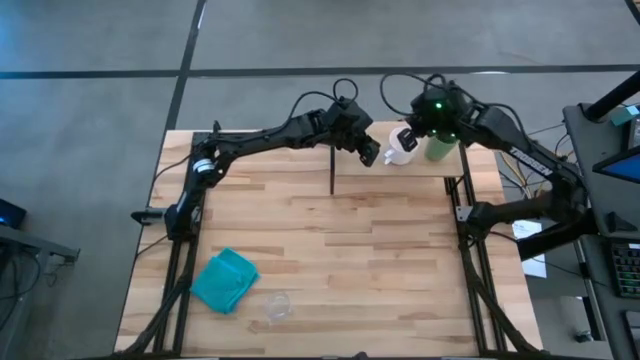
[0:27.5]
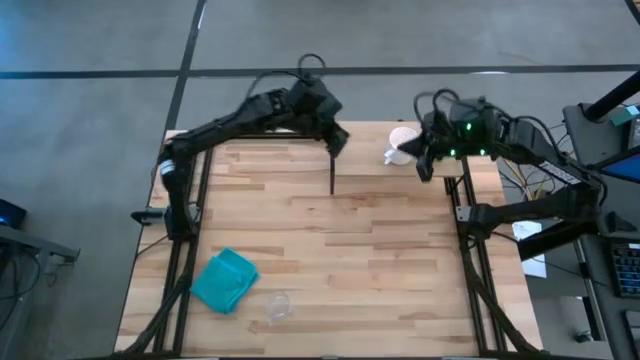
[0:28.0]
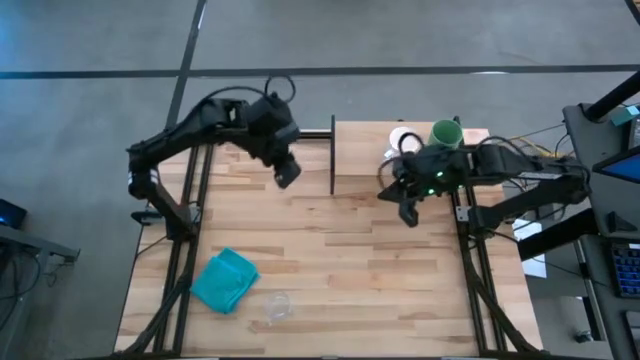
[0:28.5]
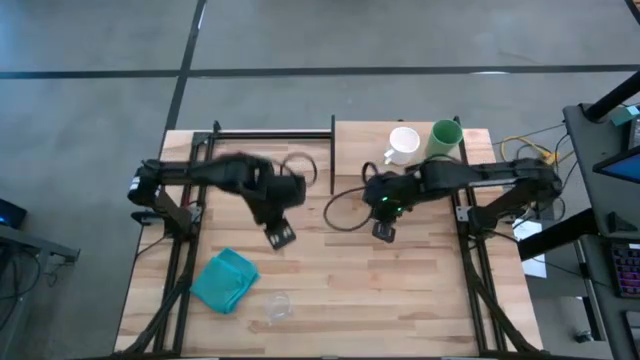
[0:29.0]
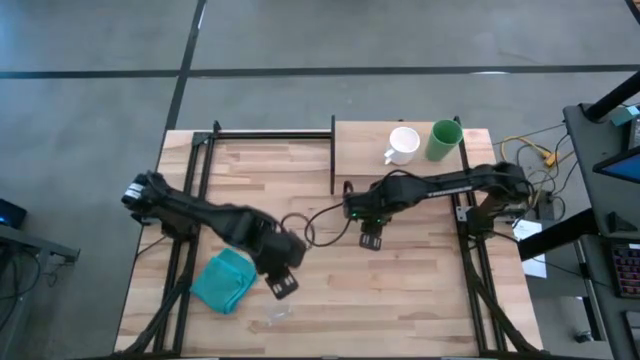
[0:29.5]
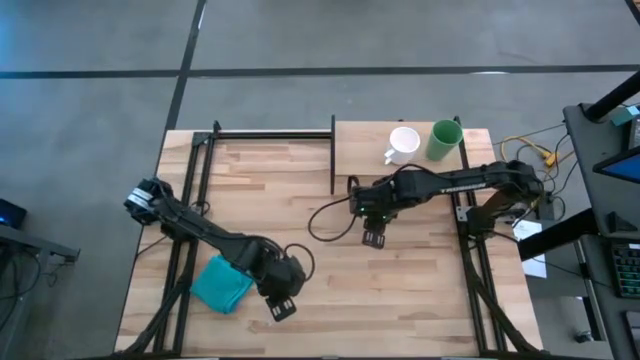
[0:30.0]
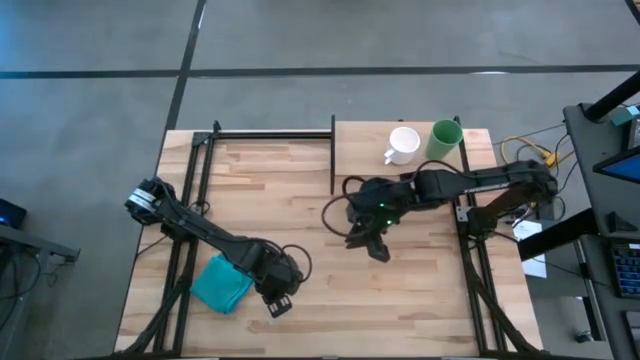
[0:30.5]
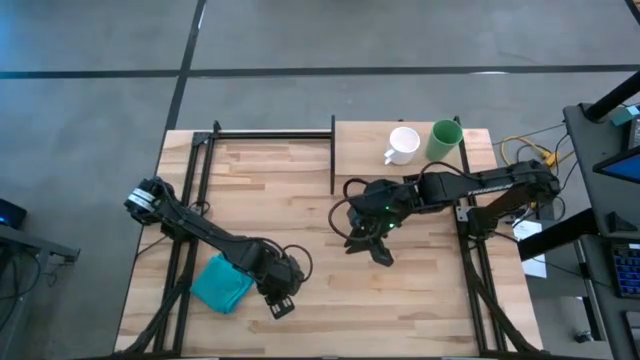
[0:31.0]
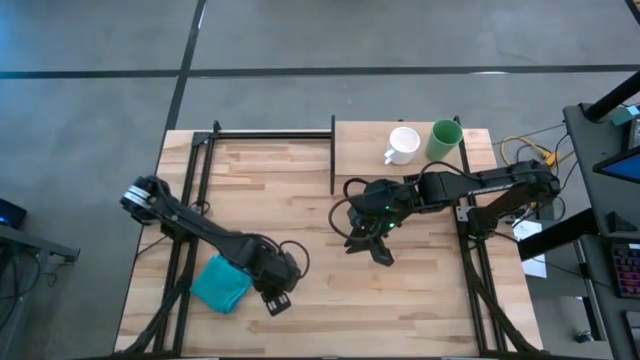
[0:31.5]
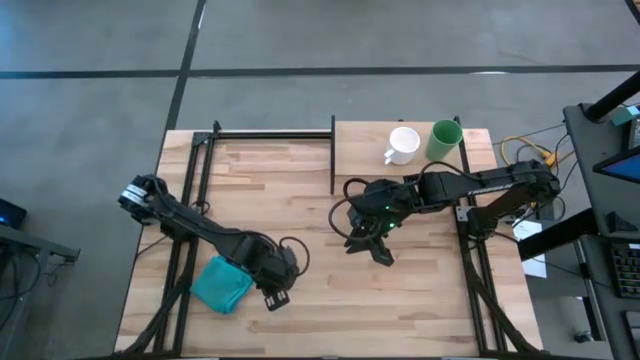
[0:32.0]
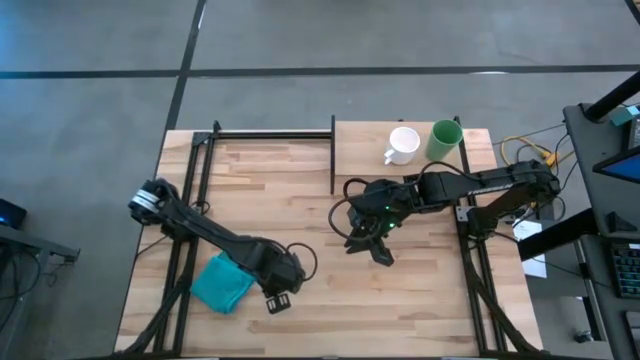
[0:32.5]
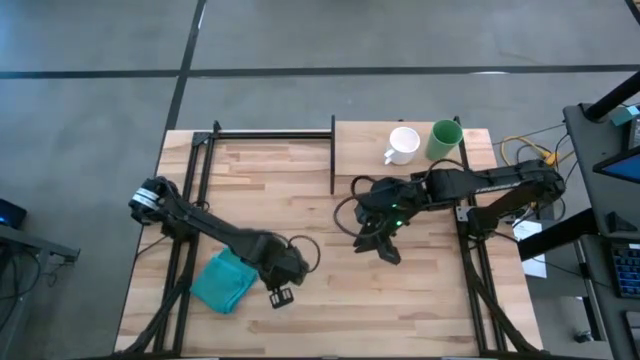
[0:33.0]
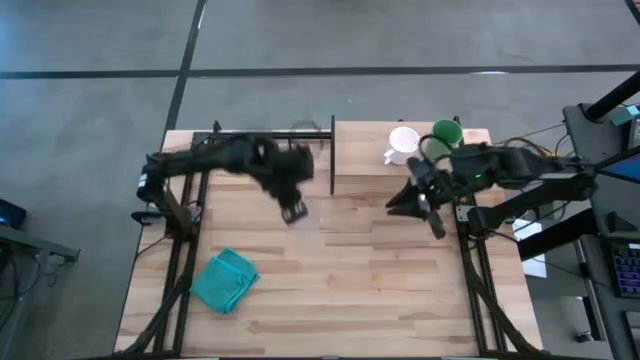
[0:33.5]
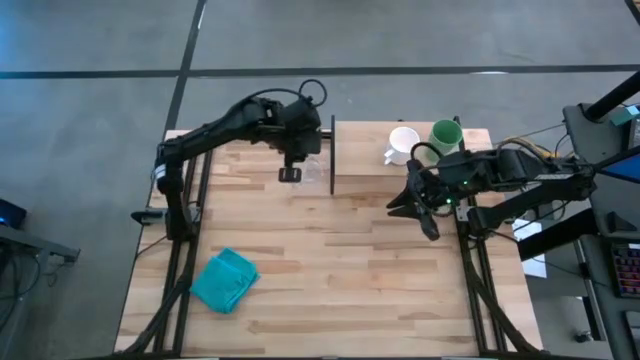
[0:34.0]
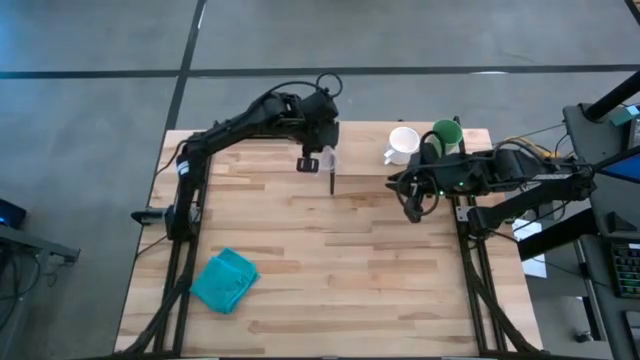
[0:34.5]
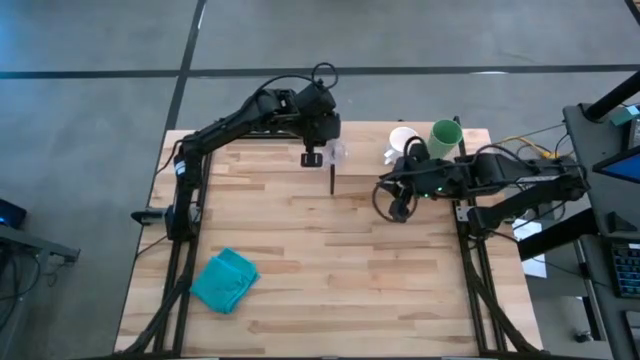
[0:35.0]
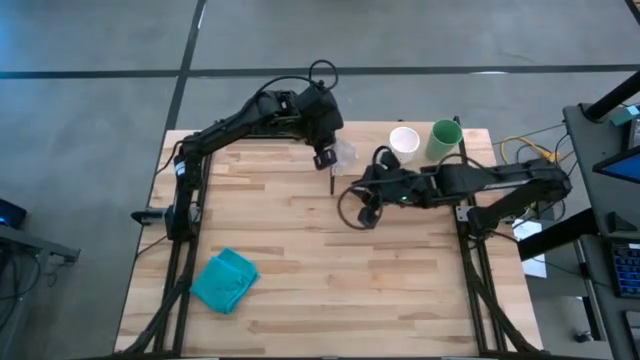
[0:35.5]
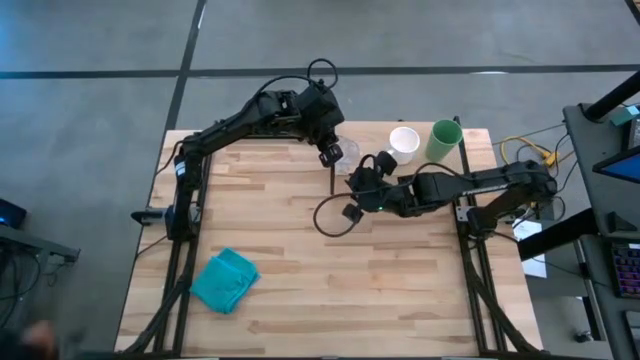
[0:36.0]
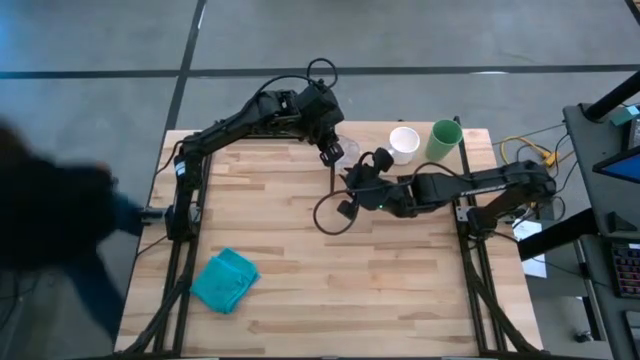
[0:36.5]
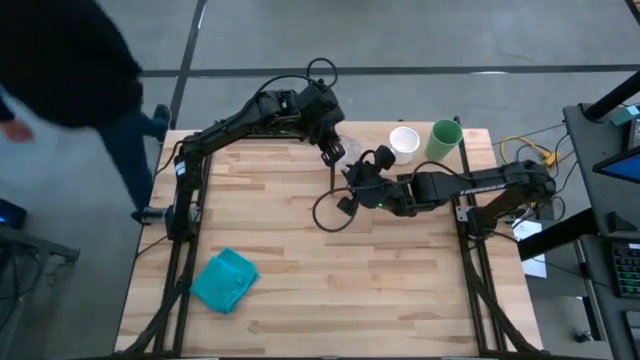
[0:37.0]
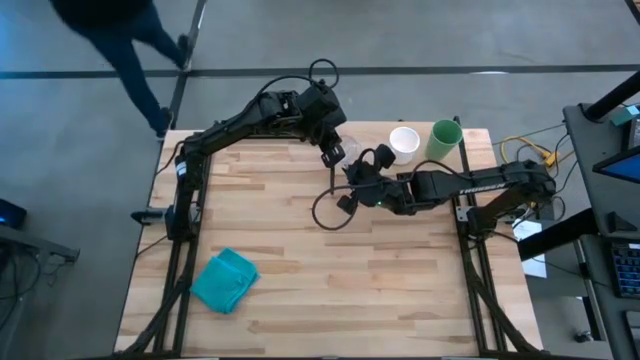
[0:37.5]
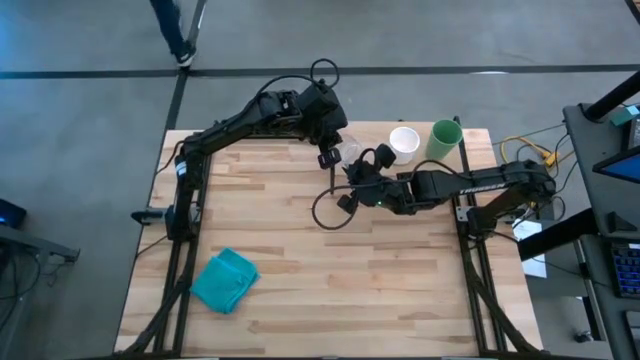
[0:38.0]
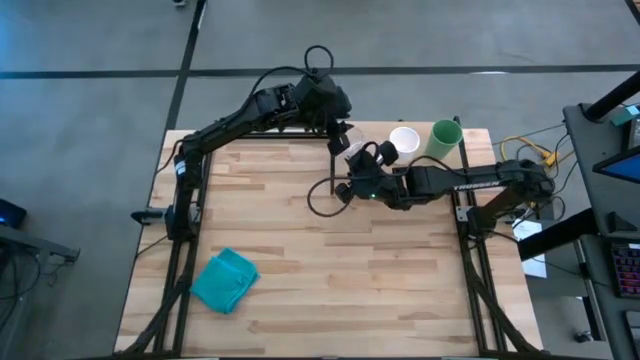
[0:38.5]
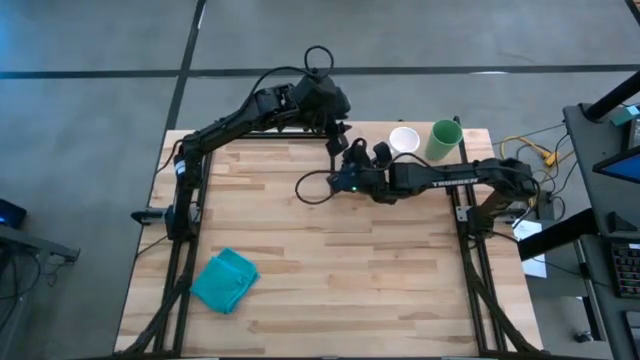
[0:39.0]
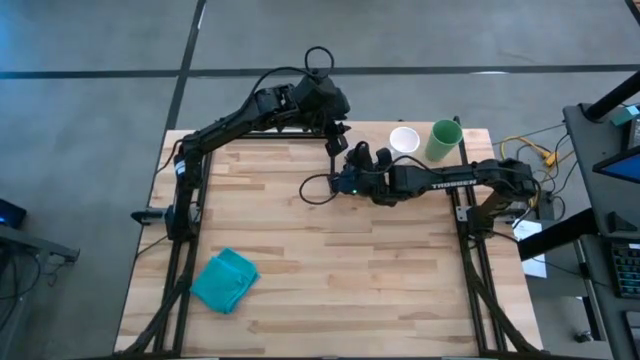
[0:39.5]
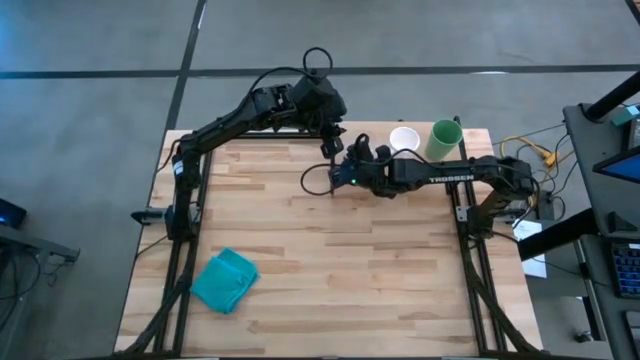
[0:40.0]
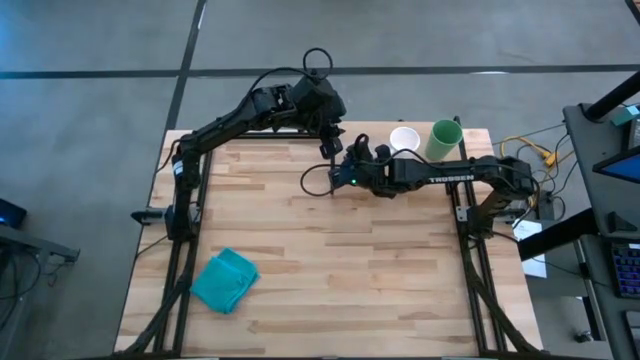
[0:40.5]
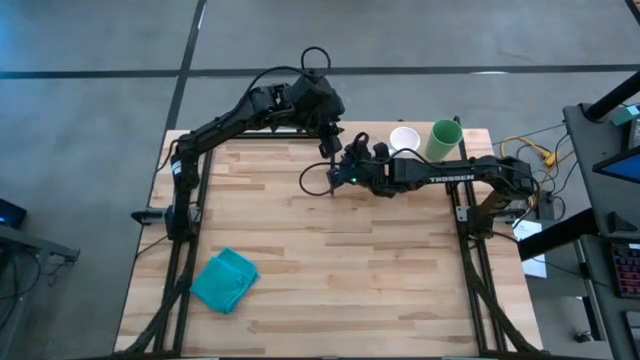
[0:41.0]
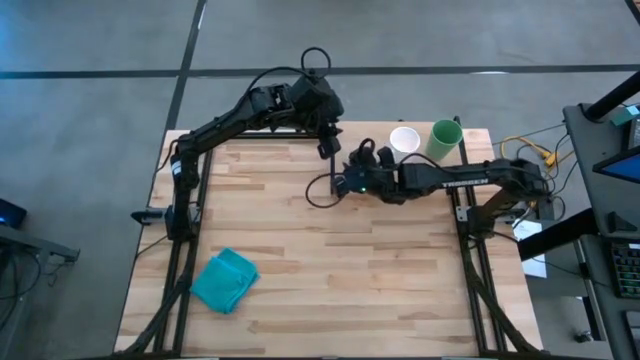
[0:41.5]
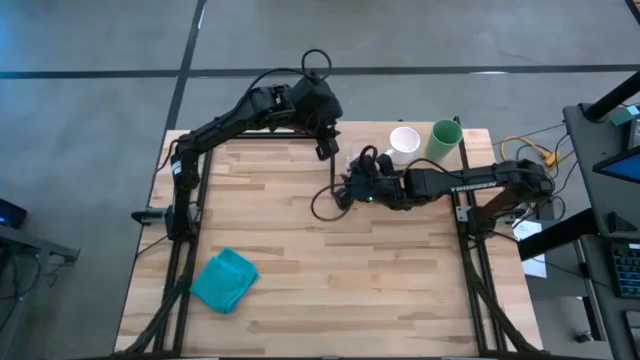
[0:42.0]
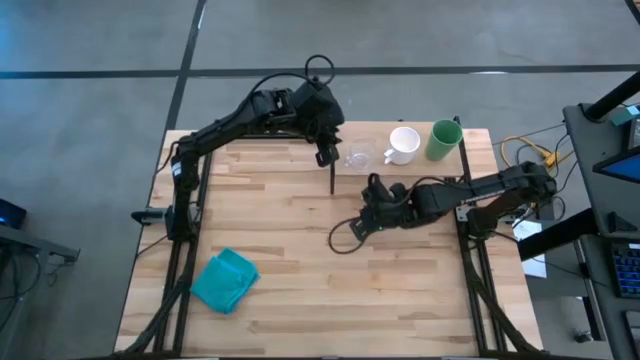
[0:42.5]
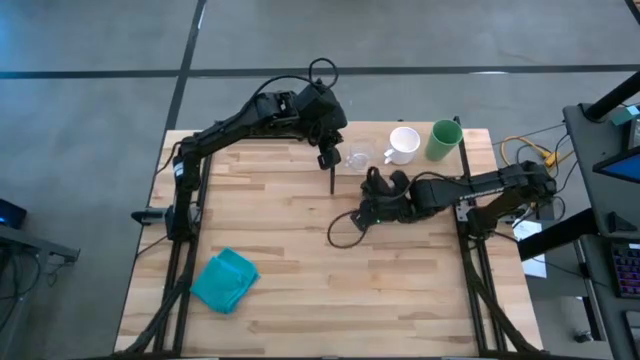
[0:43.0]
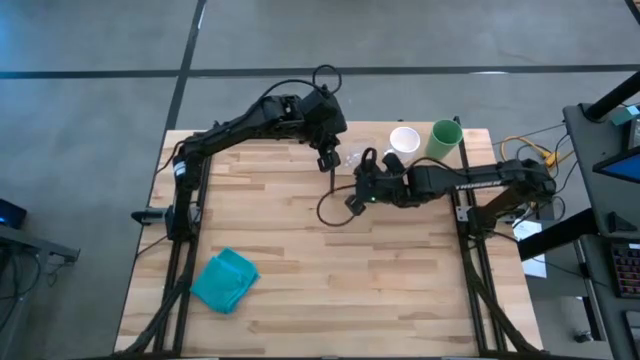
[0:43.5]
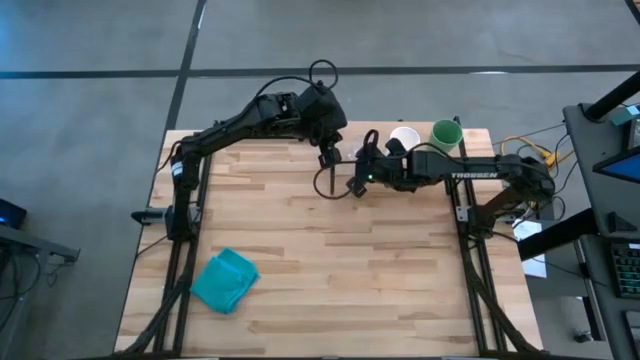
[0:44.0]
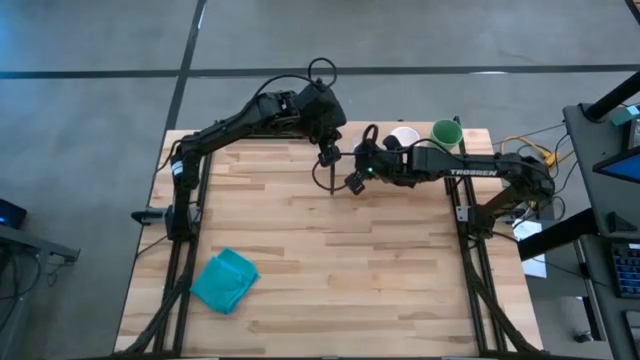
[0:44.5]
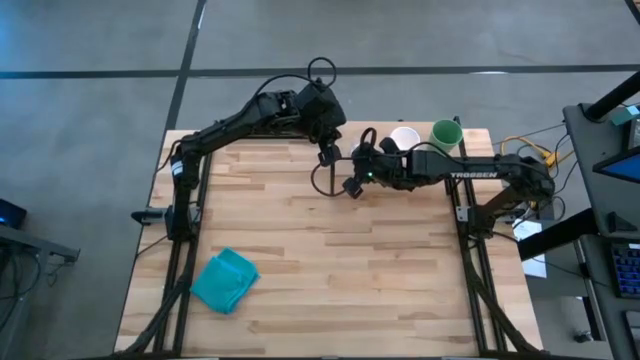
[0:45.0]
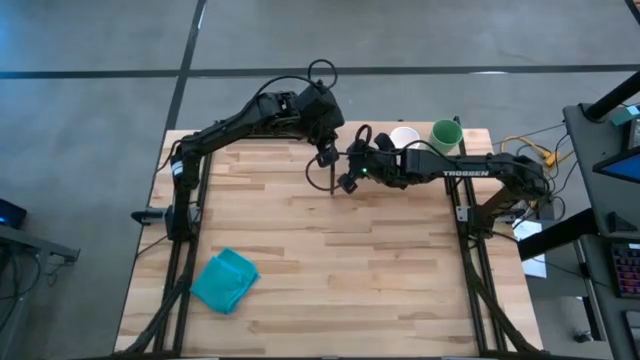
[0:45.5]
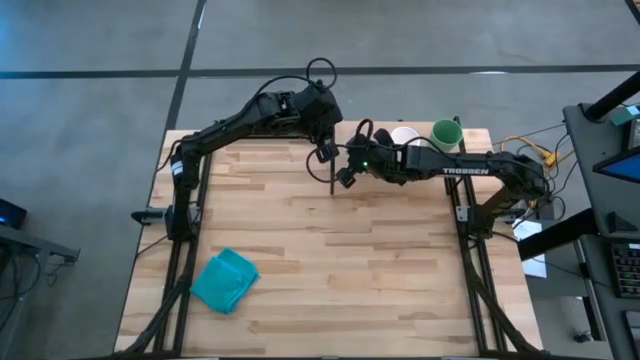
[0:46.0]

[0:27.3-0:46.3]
Task: Stack small to large cups/mugs on shelf
Put the transparent mug on the shelf

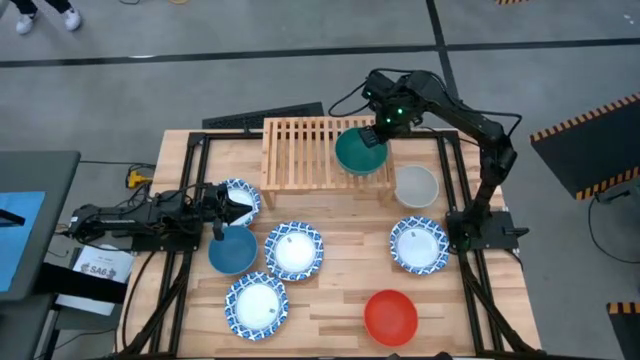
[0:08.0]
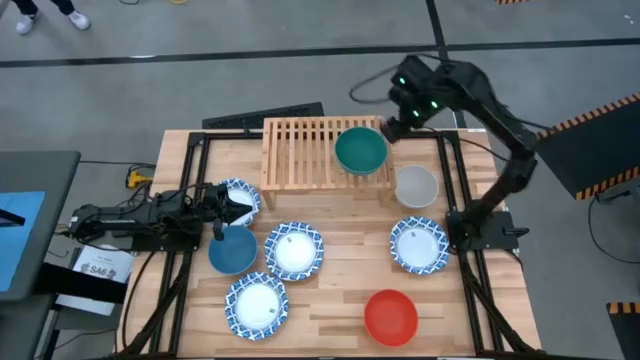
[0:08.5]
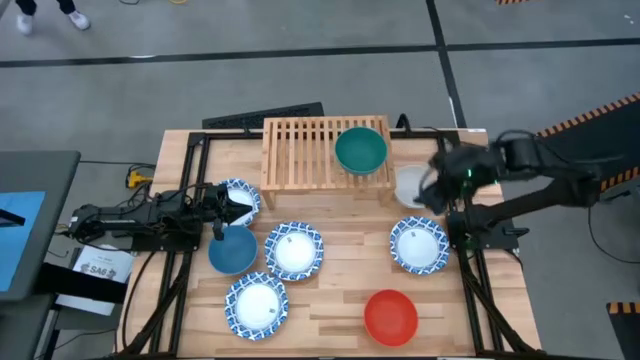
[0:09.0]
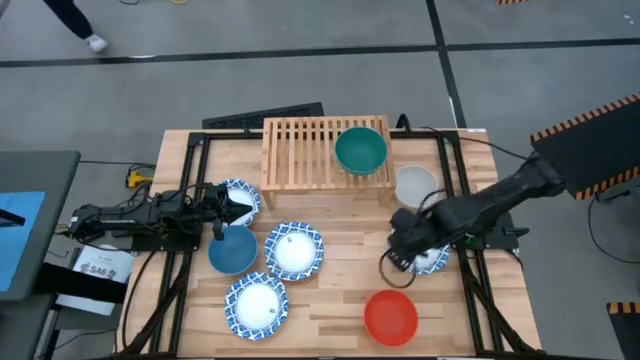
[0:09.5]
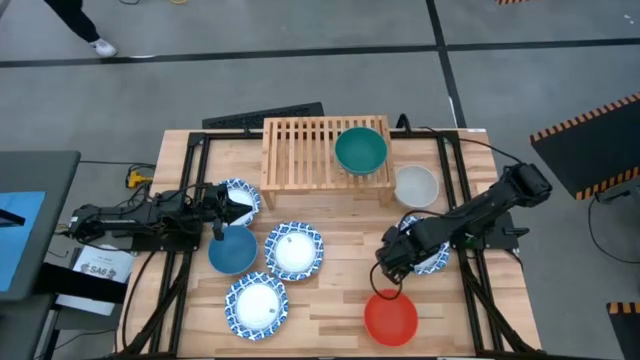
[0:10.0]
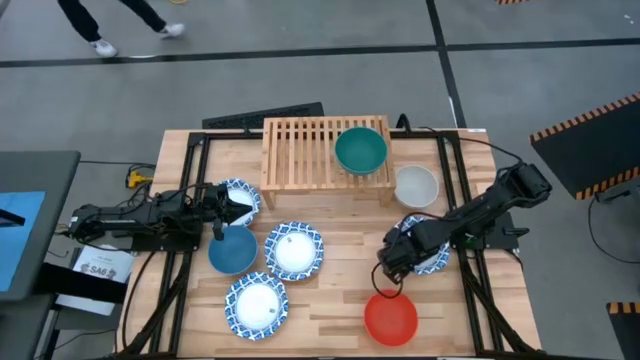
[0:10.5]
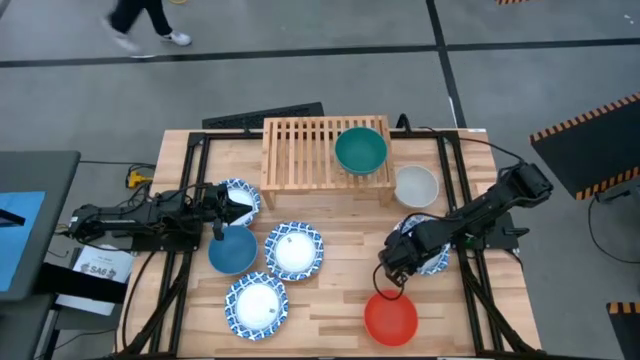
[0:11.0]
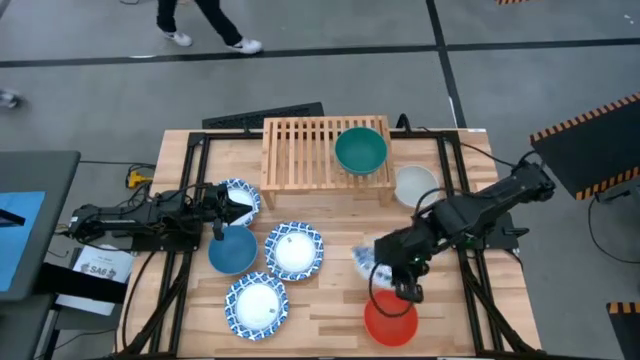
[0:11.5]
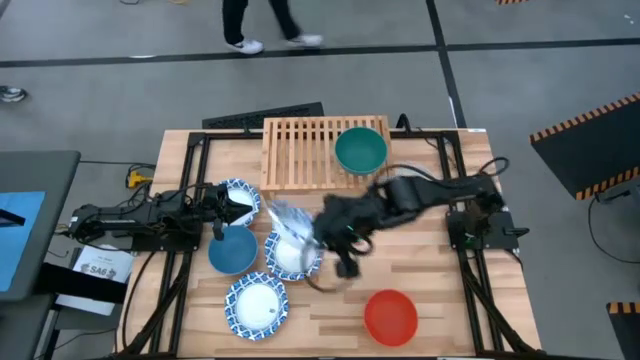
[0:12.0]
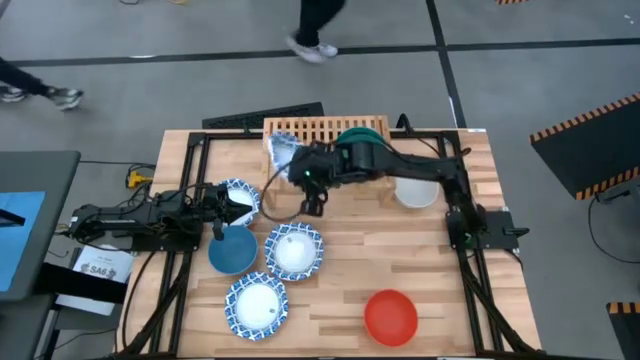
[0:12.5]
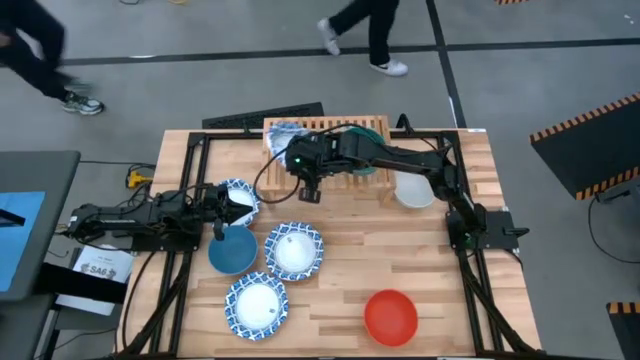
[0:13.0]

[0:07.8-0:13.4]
Task: Place and stack bowls onto a shelf
Put the white blue bowl on the shelf
